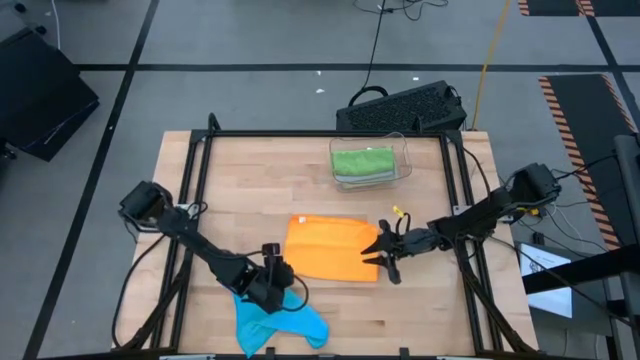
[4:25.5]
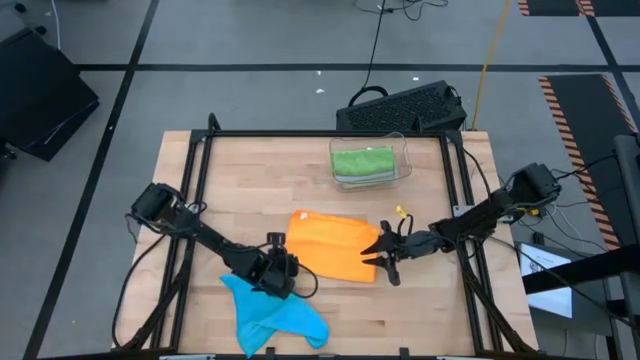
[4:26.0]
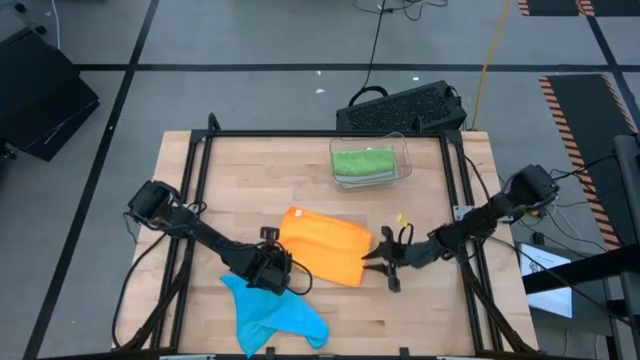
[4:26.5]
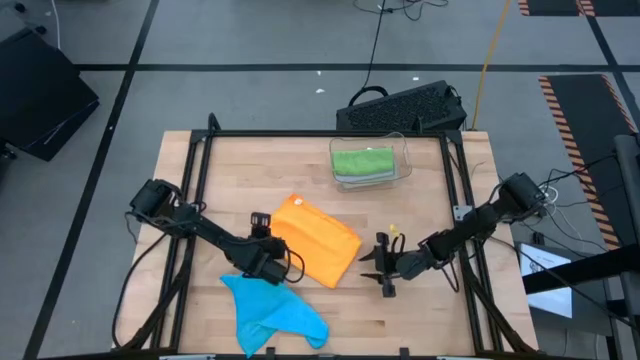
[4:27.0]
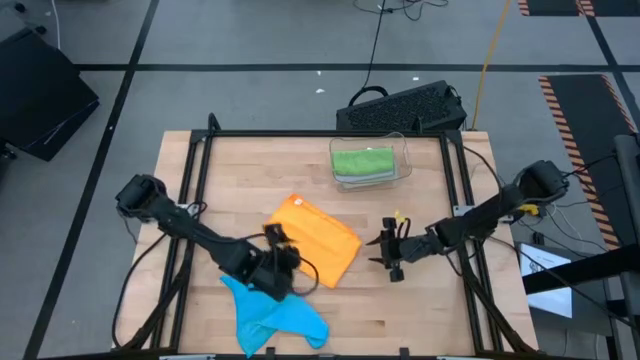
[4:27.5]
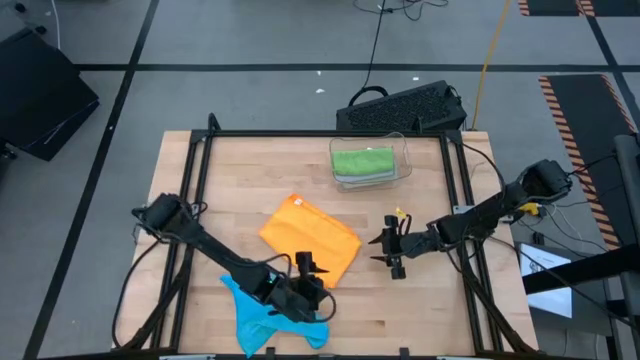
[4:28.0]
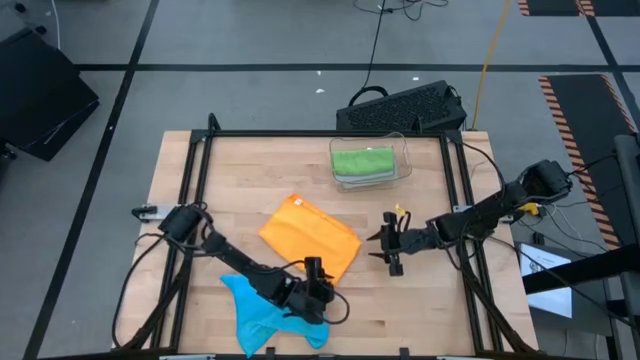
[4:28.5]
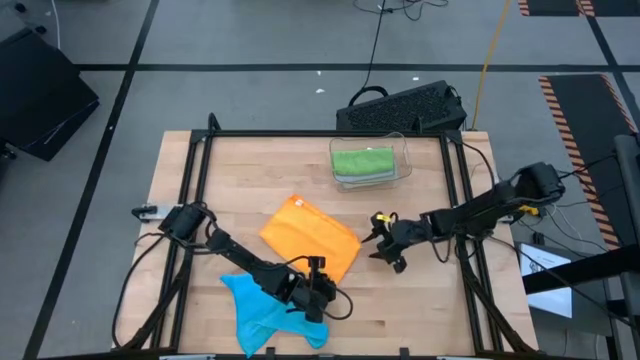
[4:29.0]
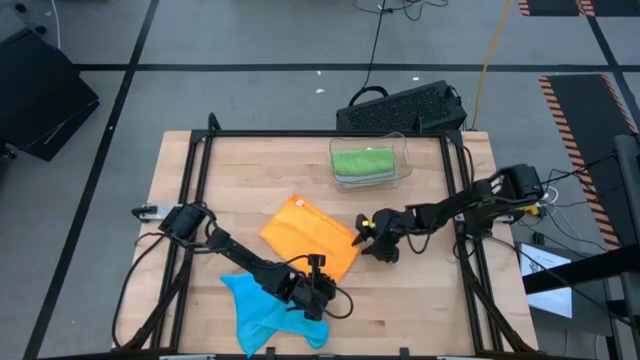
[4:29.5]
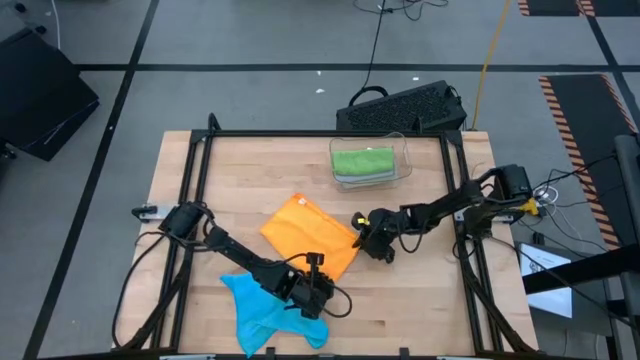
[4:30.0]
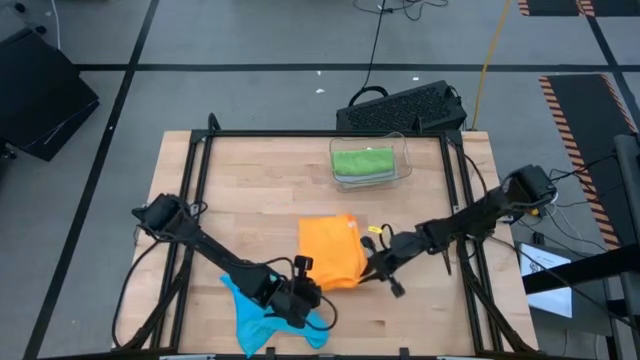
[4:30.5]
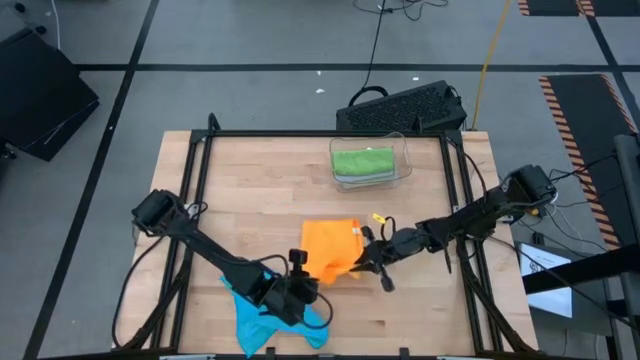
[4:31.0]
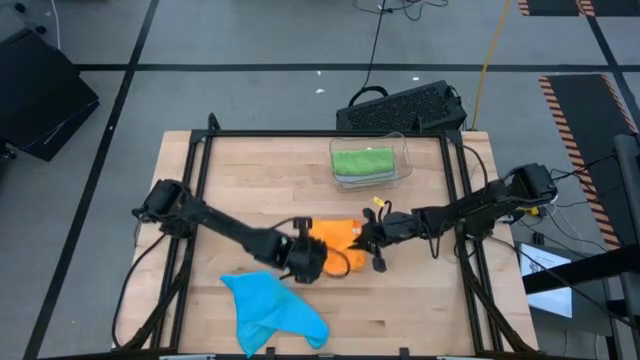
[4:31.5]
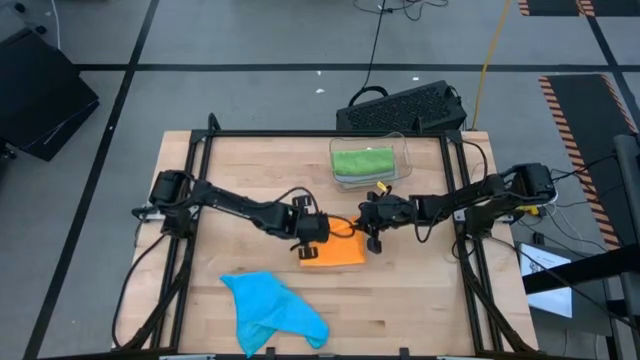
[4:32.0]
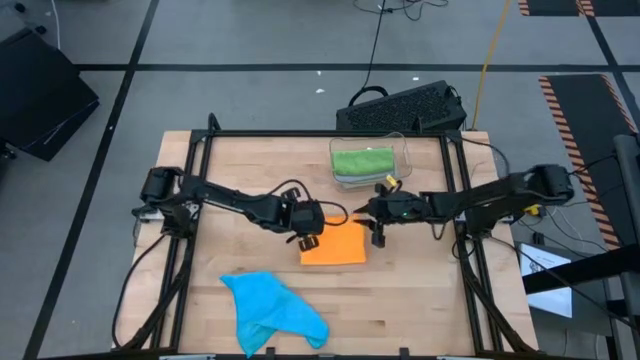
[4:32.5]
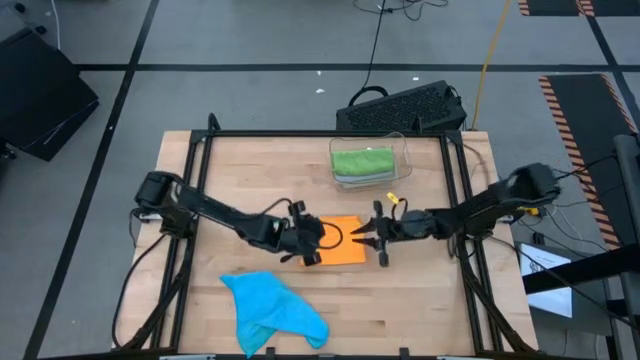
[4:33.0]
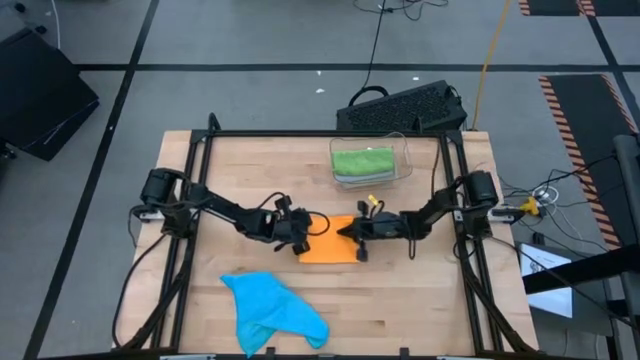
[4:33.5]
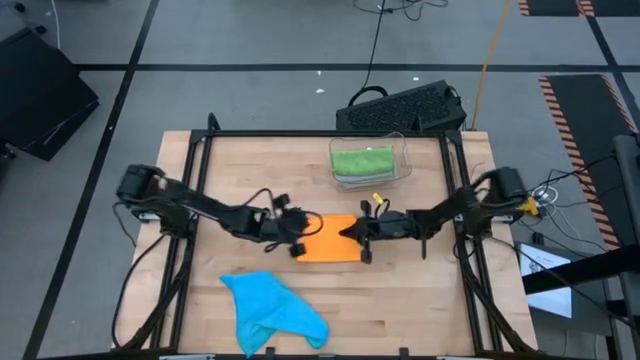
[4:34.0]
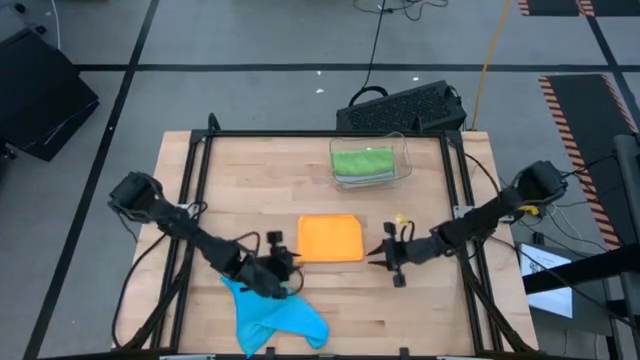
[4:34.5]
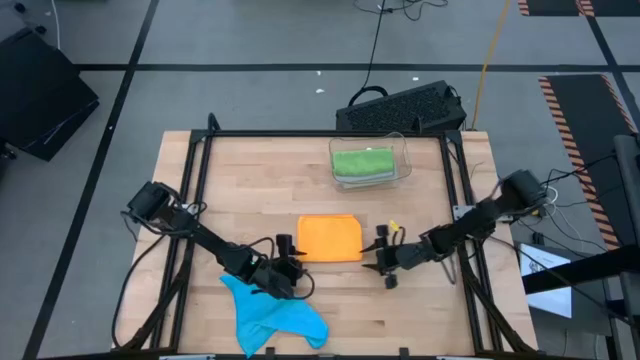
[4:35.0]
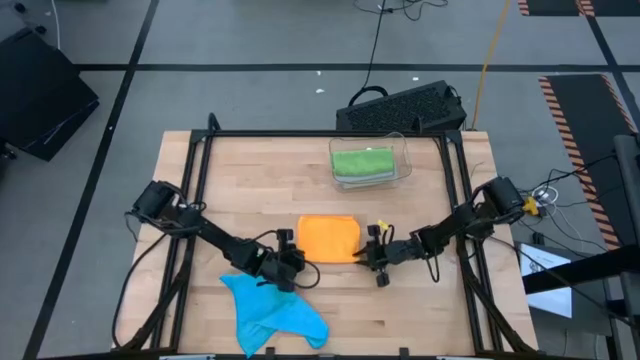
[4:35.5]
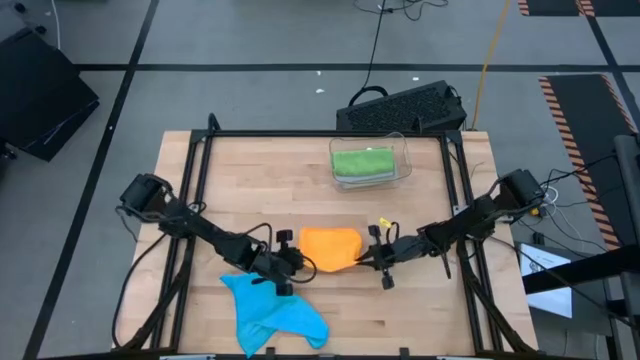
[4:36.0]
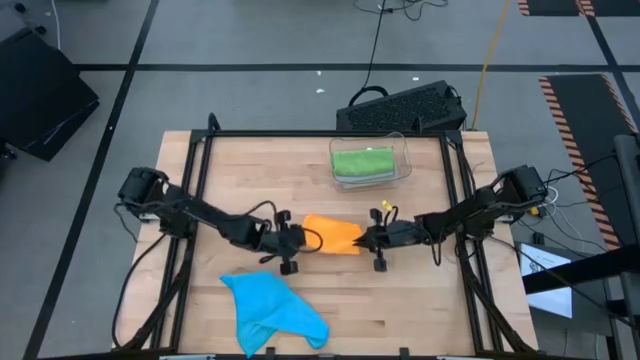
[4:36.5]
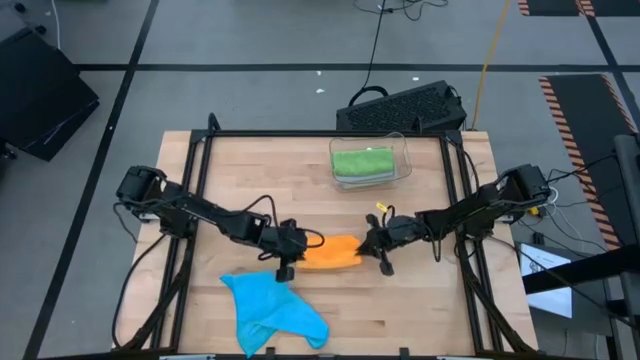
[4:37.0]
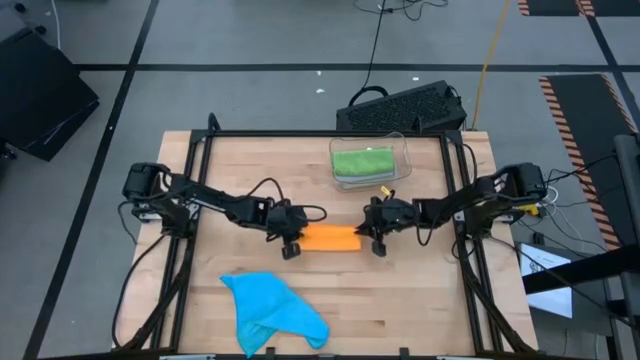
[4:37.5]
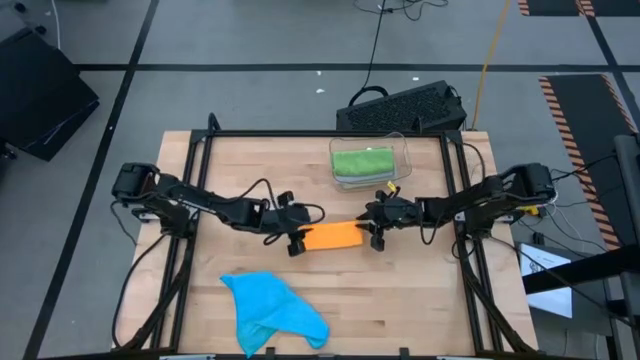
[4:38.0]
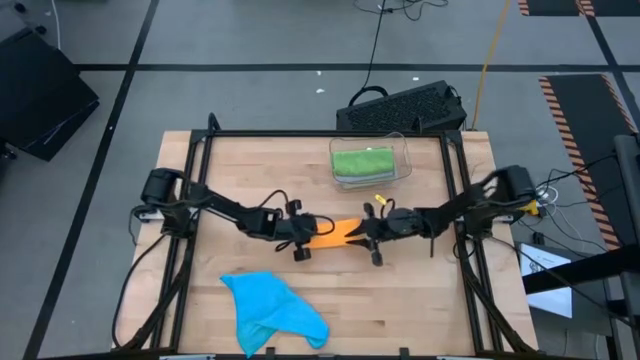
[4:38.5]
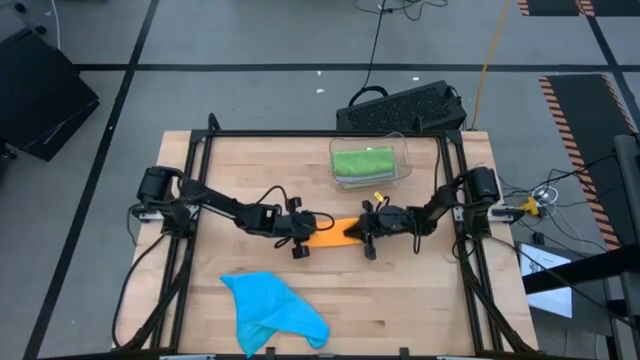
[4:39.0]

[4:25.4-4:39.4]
Task: Fold microfiber towels
Fold the orange microfiber towel

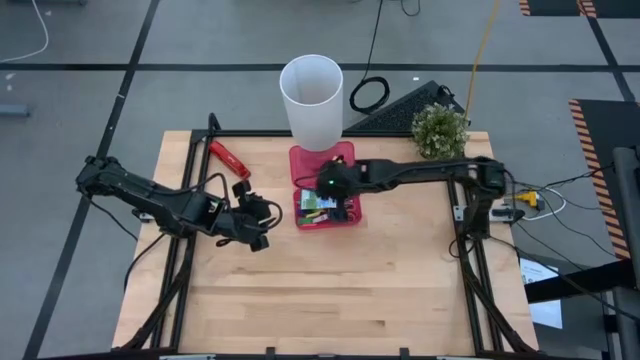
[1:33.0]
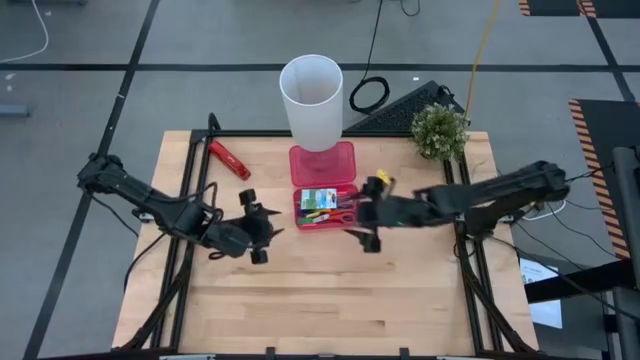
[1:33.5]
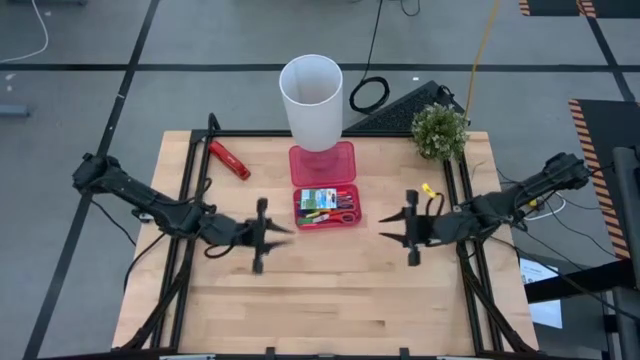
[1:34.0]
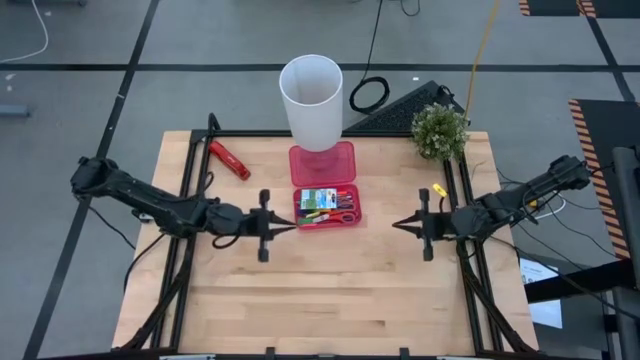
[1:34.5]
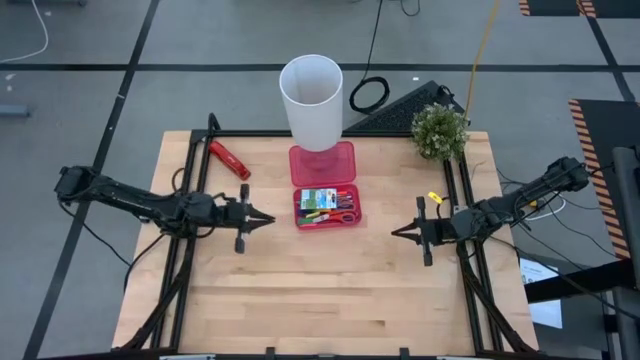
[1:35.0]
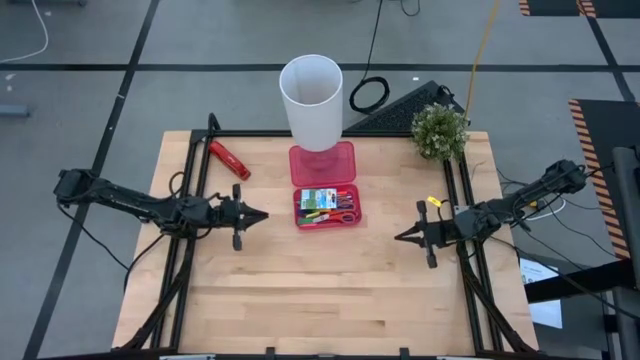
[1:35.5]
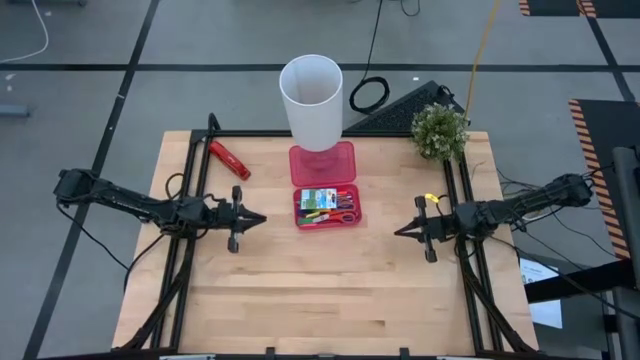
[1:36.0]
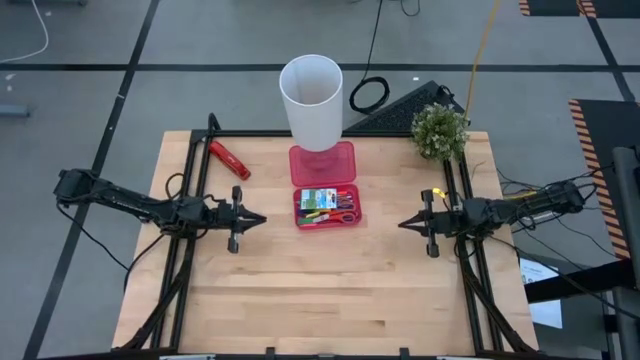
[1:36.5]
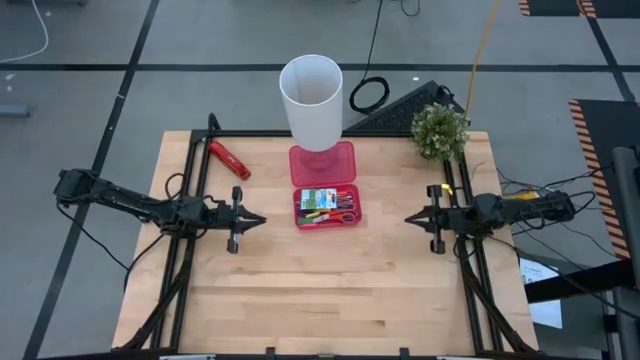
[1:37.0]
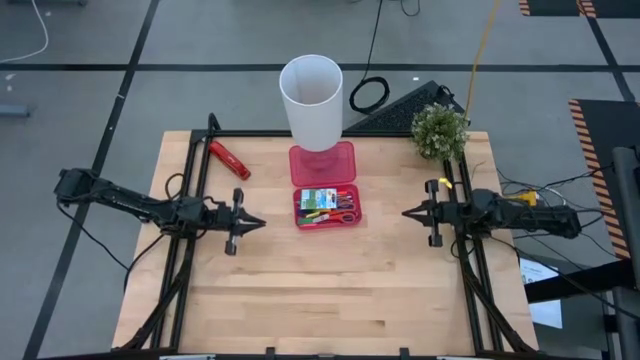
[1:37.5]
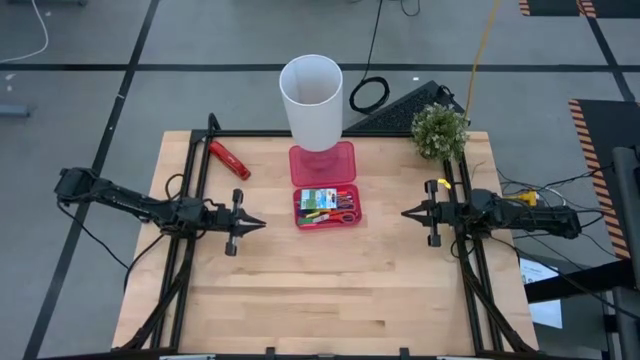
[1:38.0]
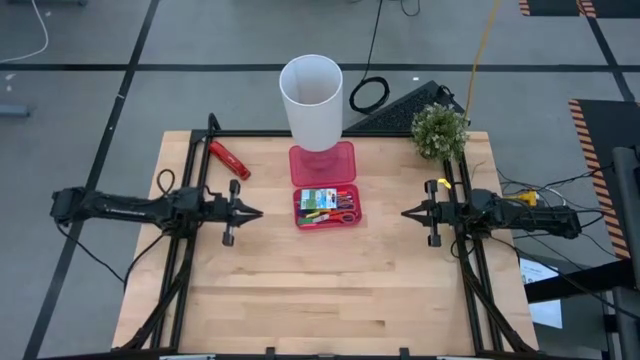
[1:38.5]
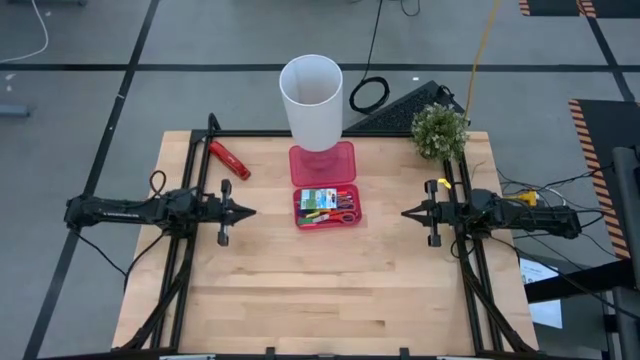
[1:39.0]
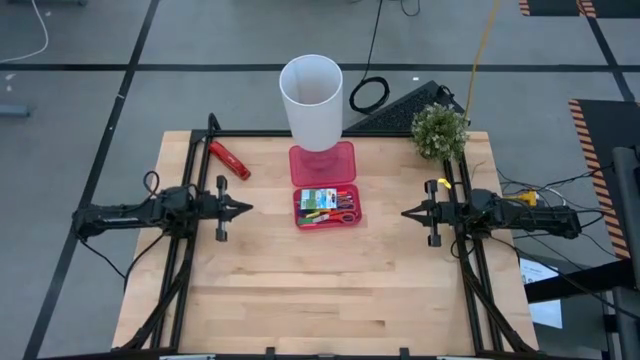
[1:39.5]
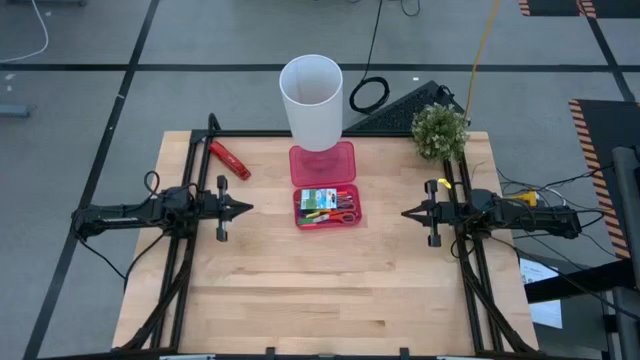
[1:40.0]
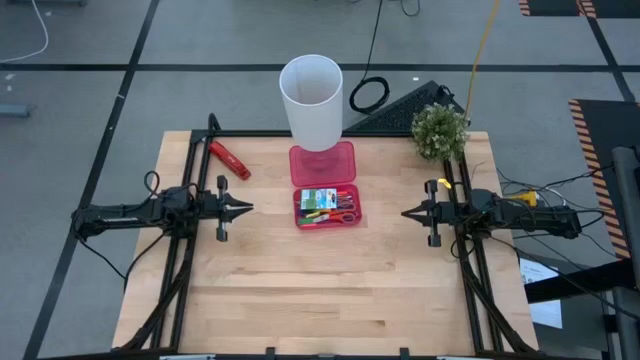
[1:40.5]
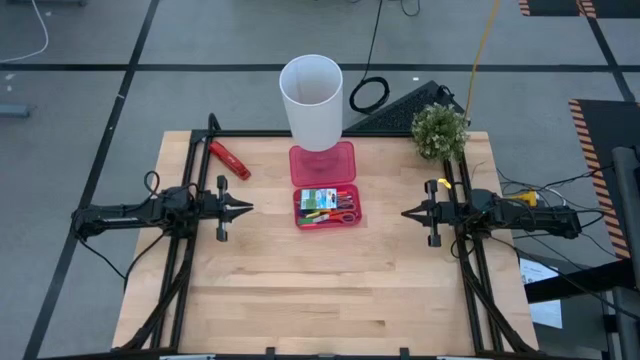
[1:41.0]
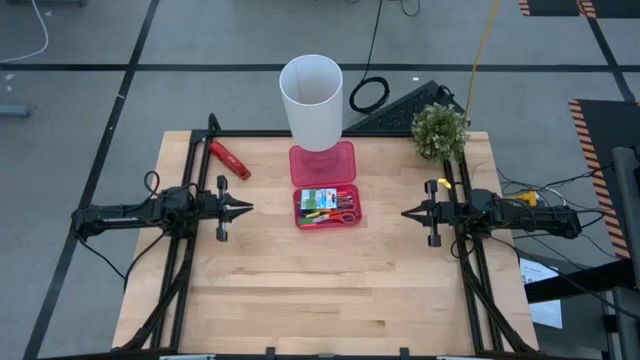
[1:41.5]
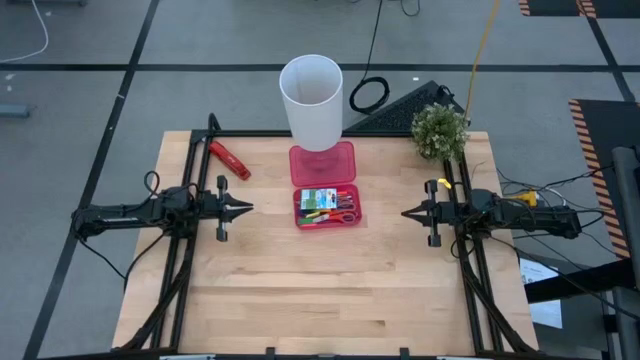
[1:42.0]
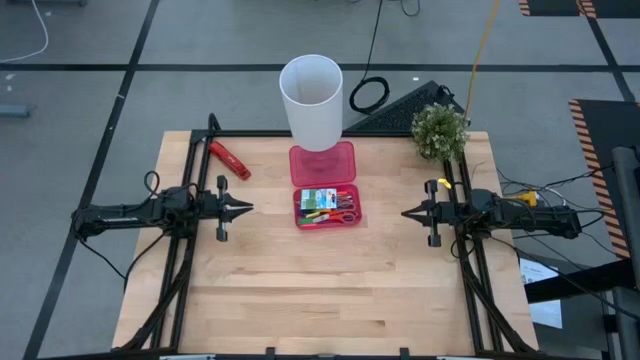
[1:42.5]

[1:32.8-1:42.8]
Task: Pack school essentials
Return to Home Position
